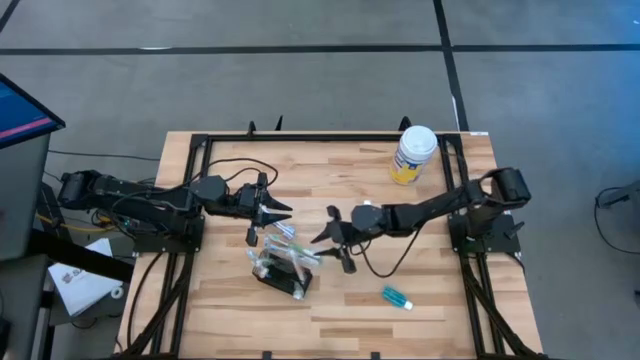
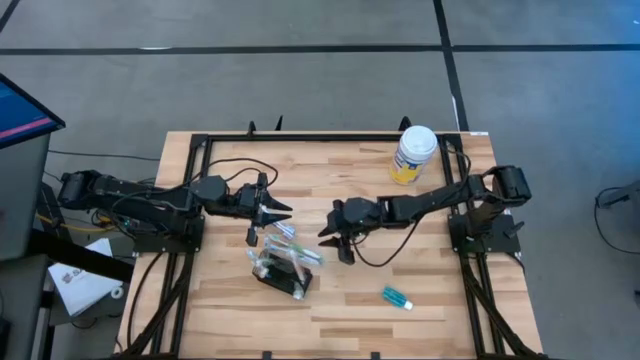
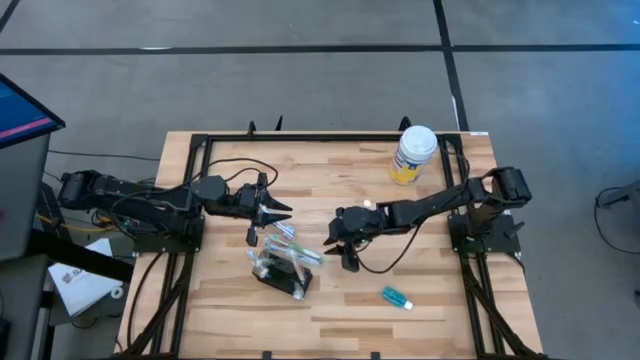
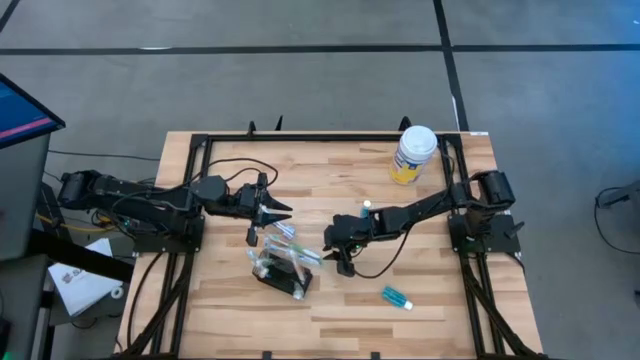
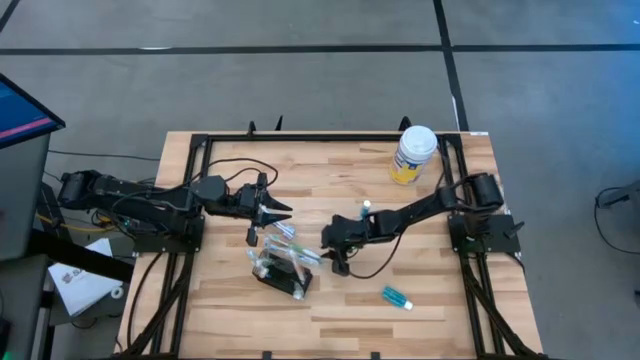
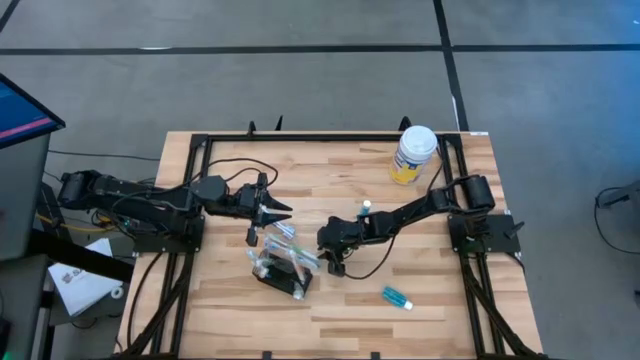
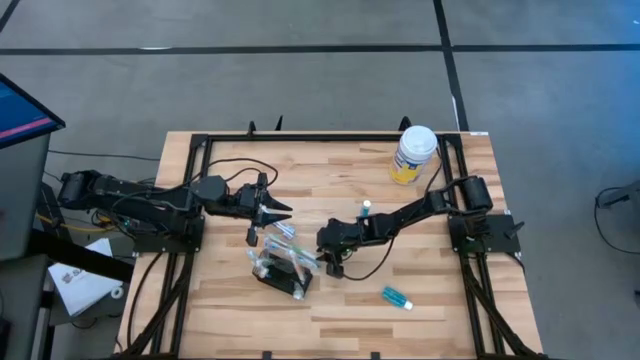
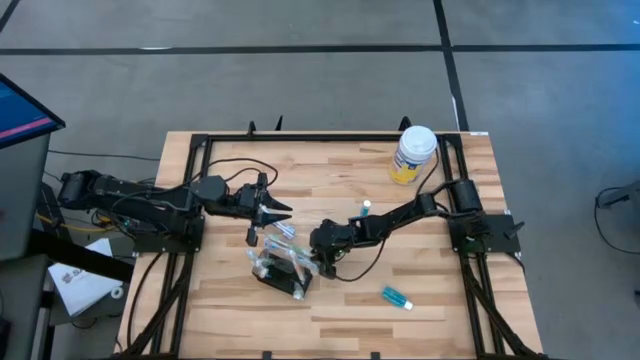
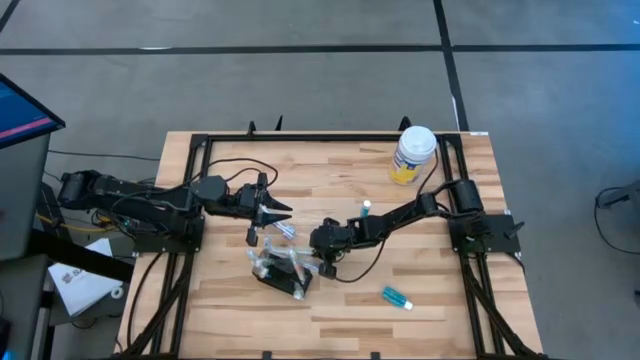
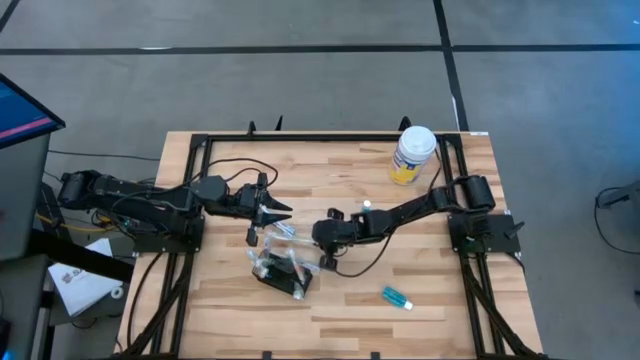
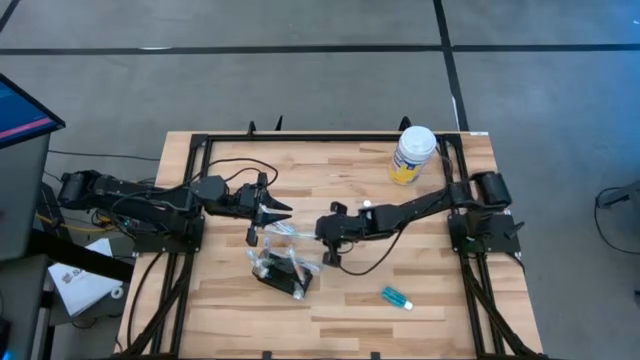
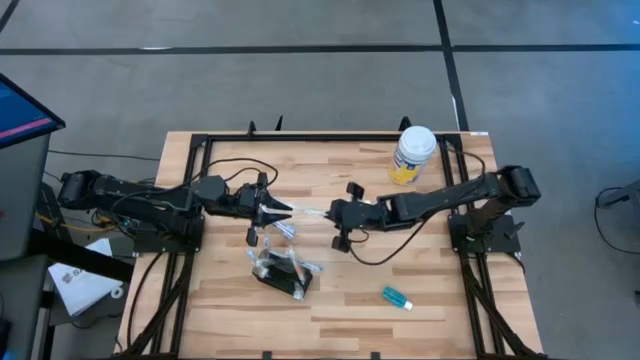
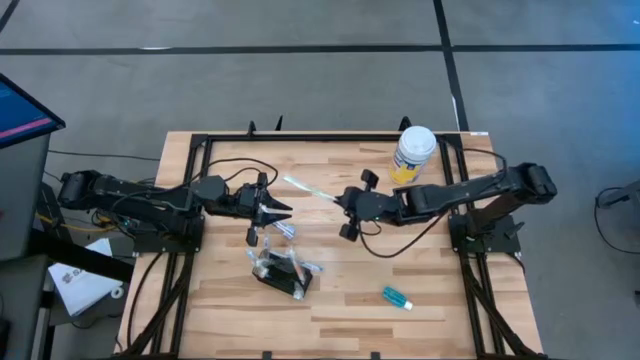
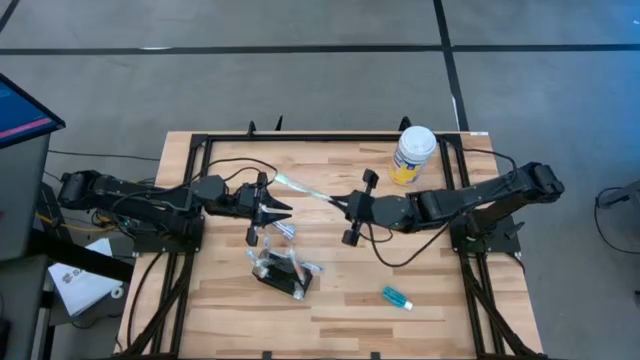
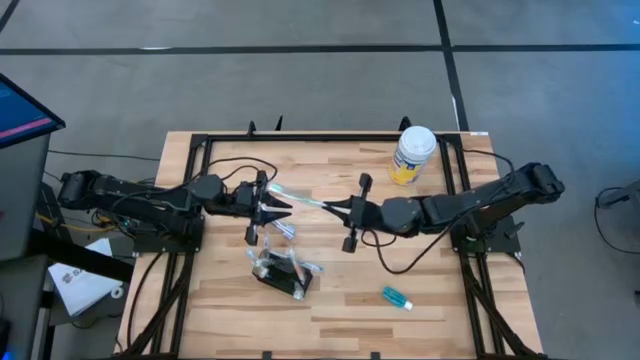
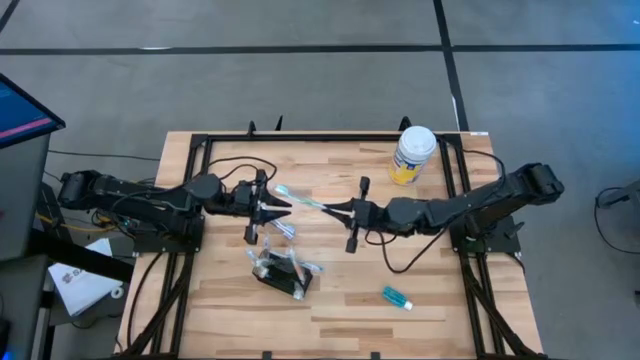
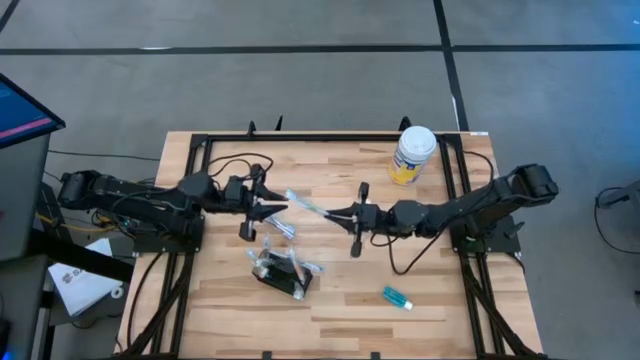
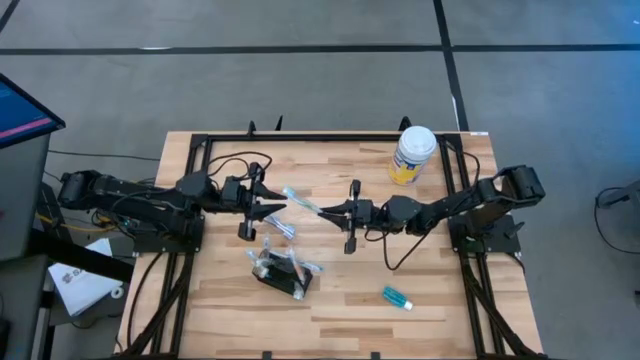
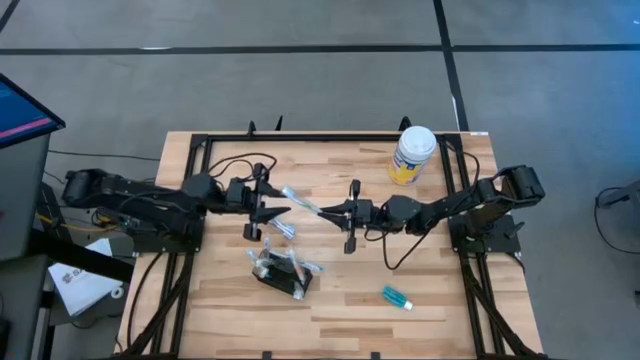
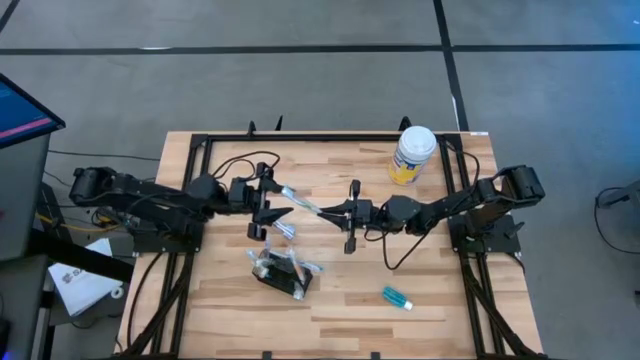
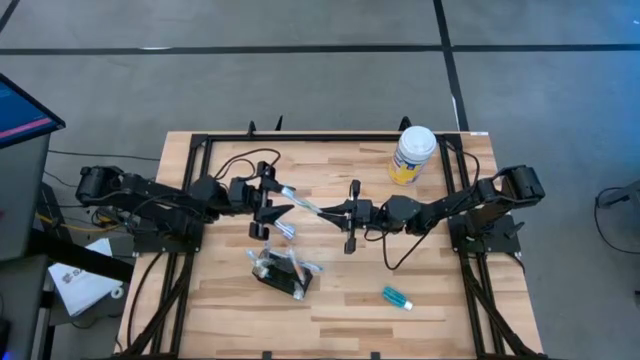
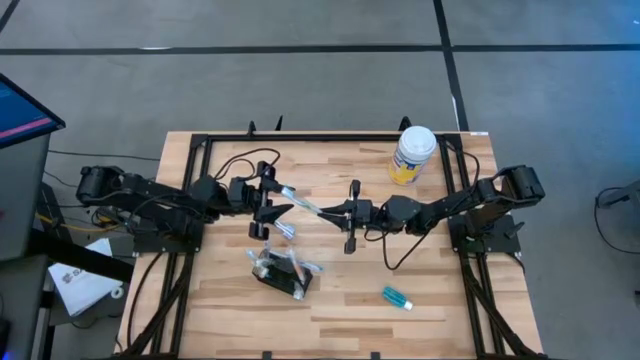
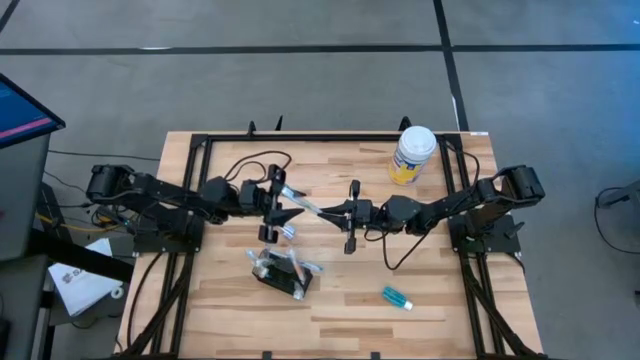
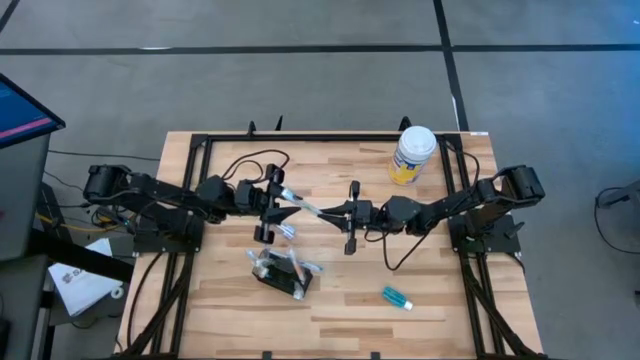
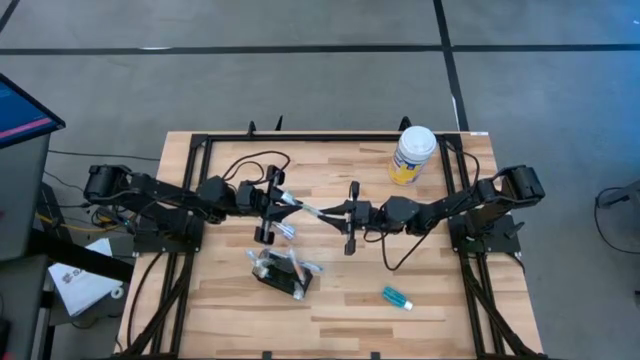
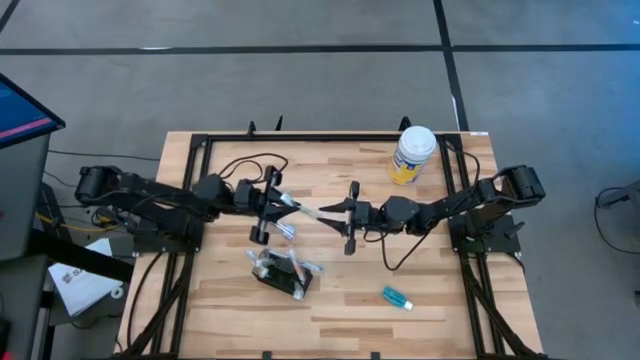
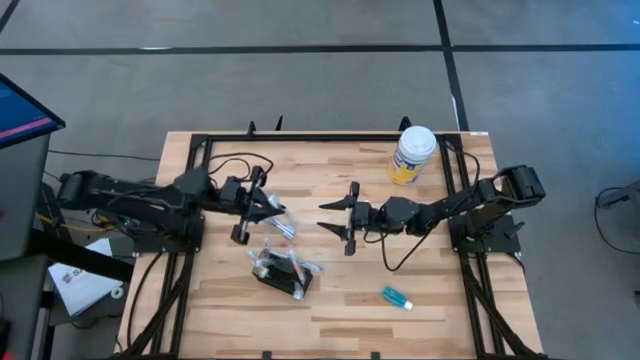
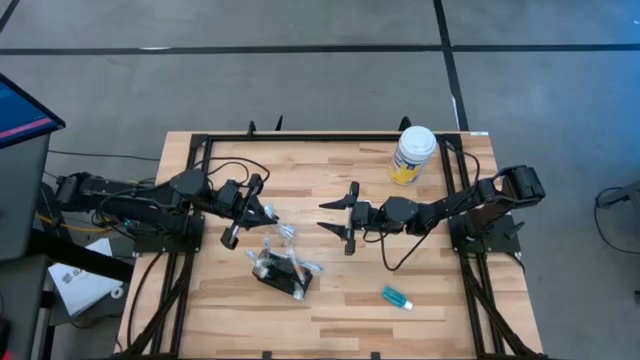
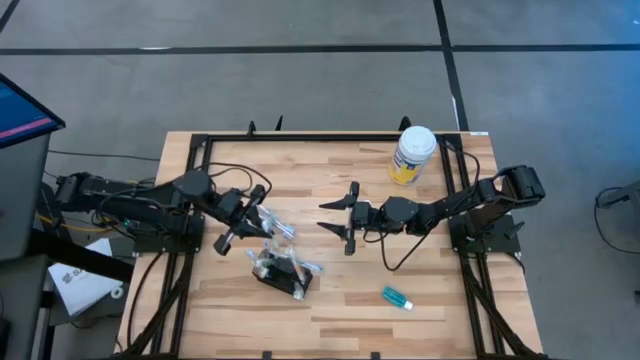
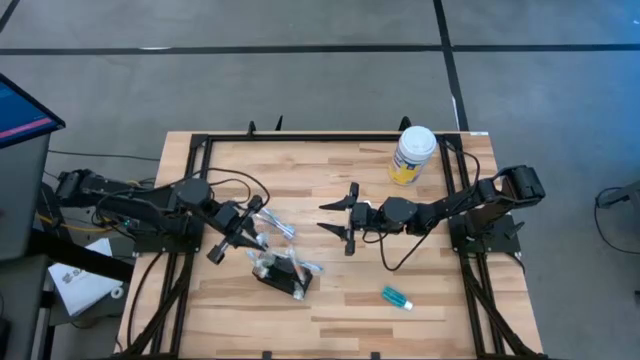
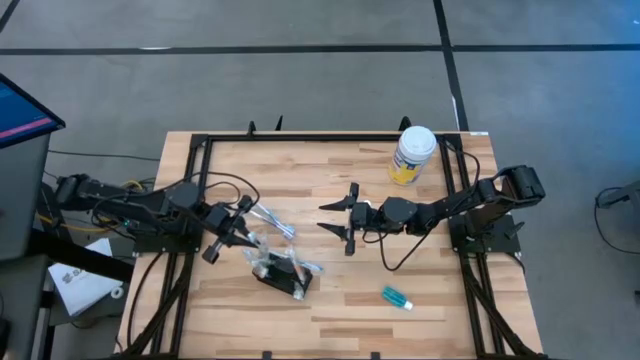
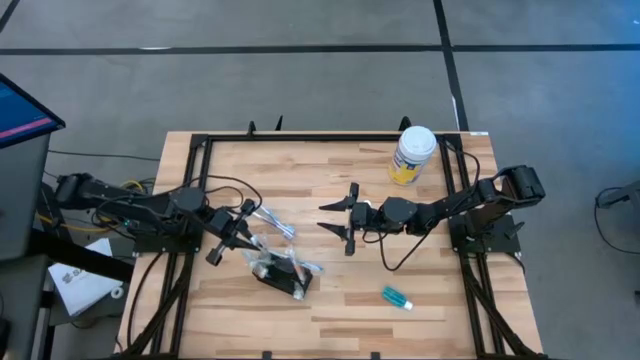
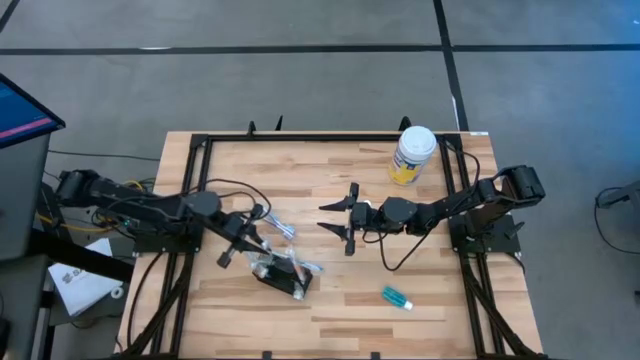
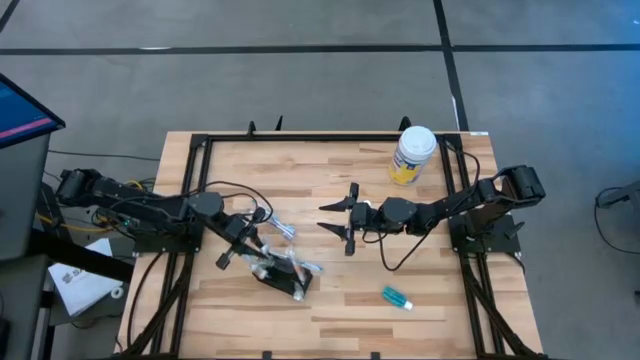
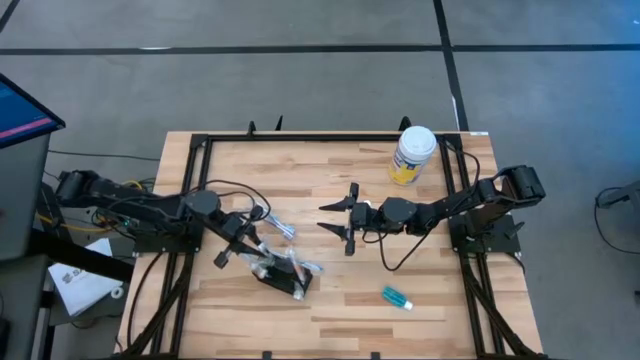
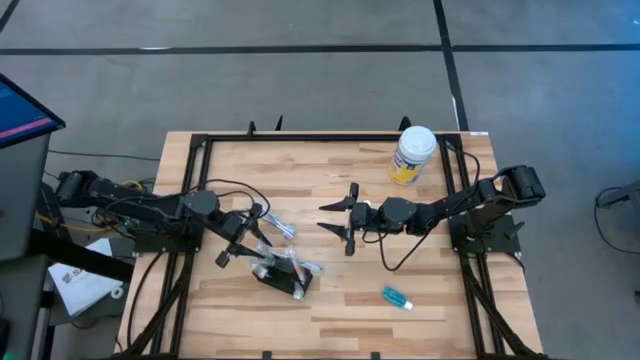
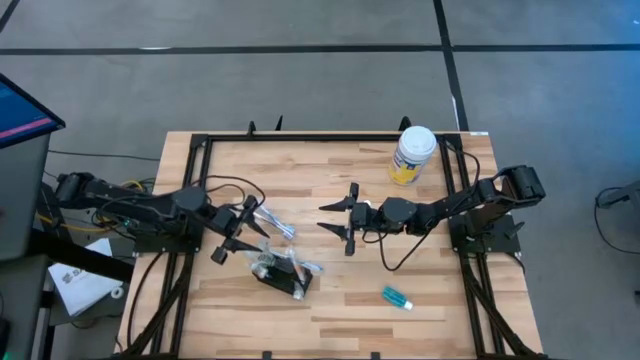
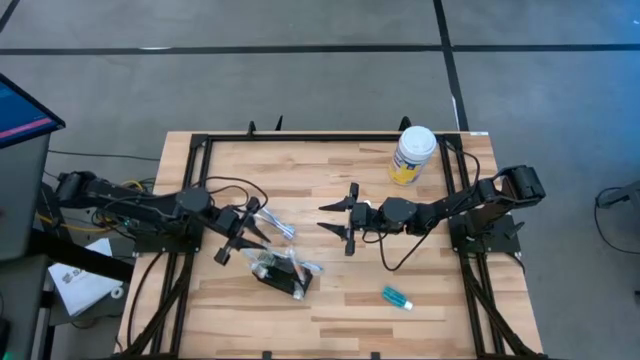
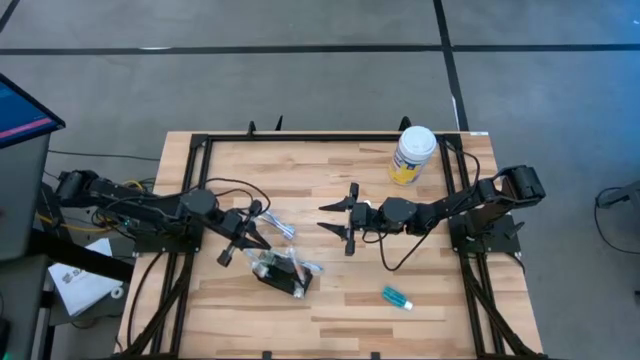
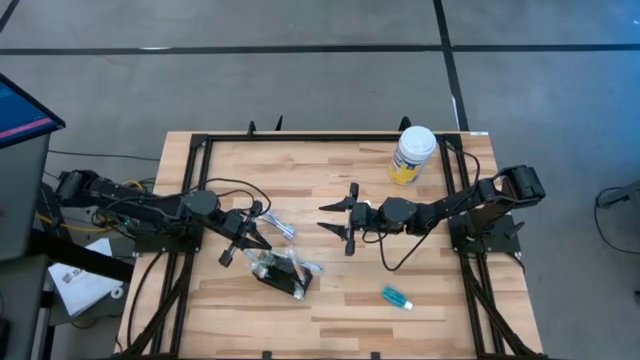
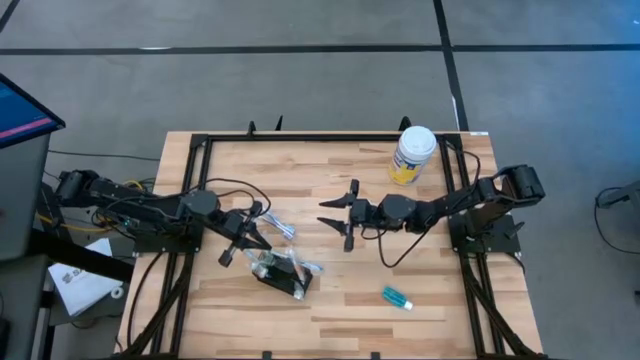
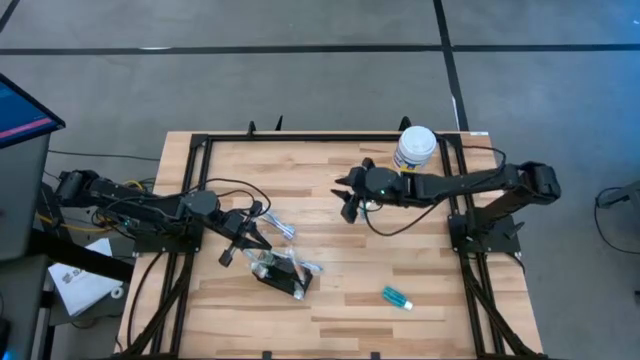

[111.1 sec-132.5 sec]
Task: Pick & Place toothbrushing station
Put the green toothbrush into the mesh organizer
